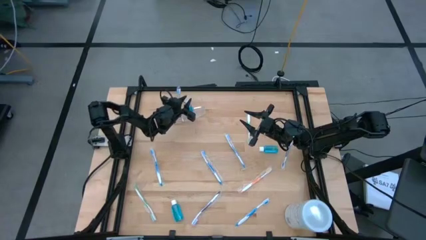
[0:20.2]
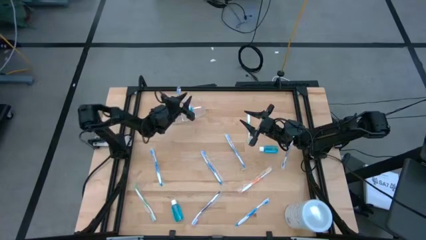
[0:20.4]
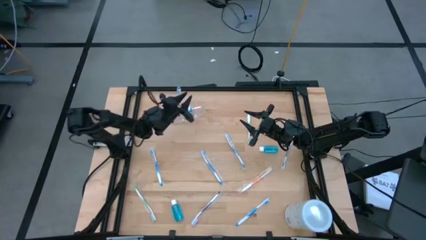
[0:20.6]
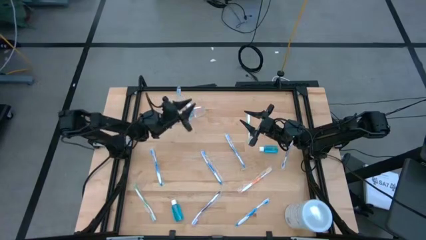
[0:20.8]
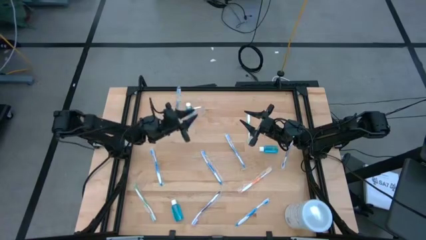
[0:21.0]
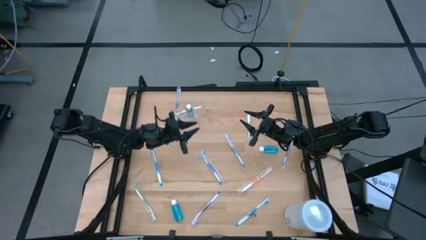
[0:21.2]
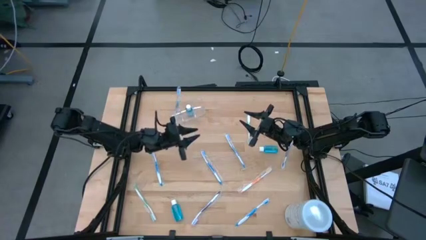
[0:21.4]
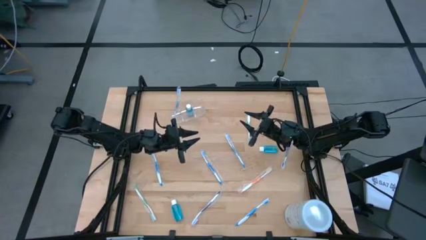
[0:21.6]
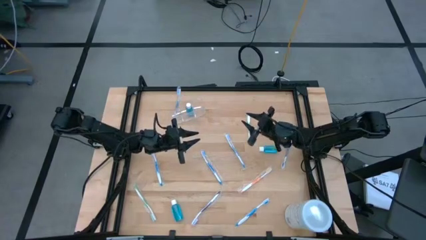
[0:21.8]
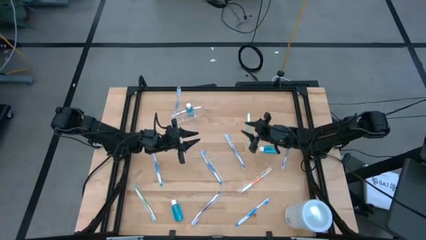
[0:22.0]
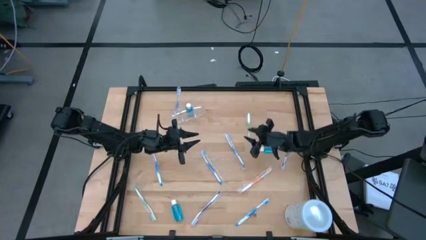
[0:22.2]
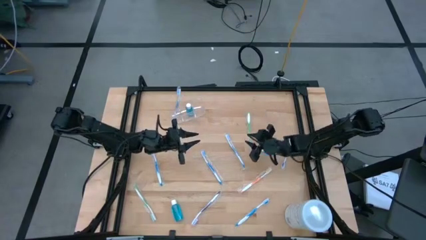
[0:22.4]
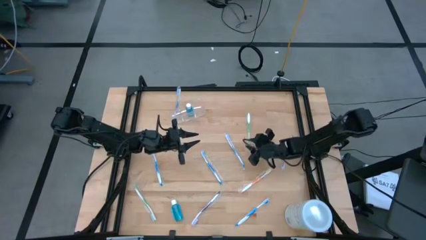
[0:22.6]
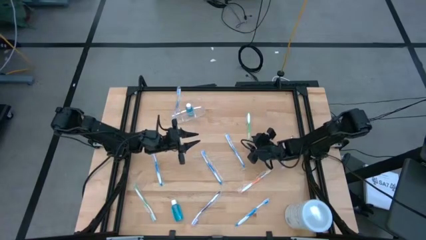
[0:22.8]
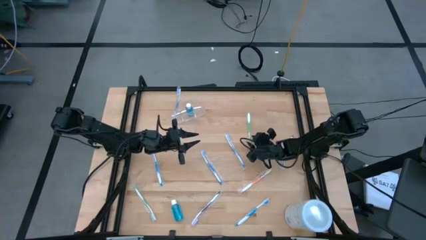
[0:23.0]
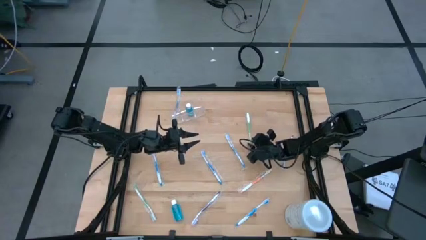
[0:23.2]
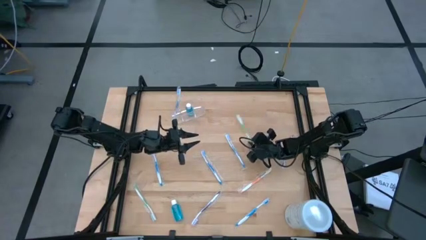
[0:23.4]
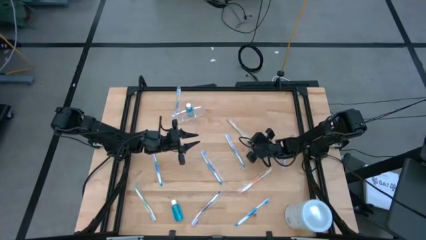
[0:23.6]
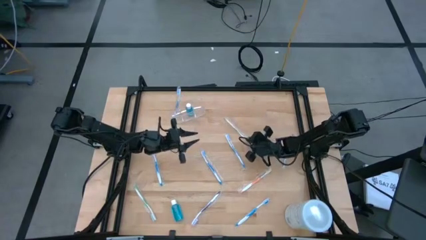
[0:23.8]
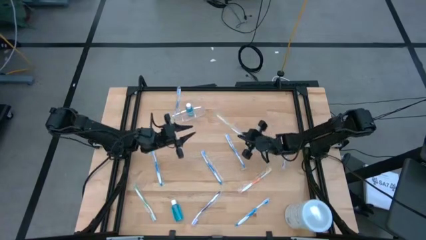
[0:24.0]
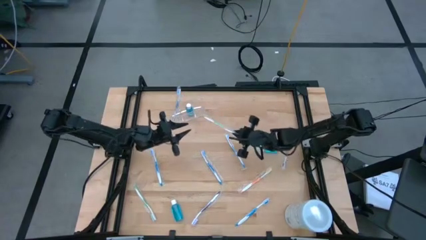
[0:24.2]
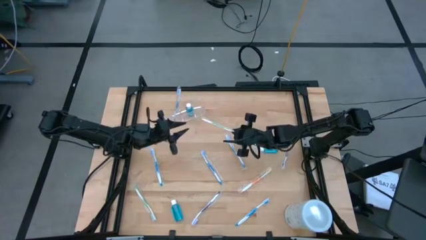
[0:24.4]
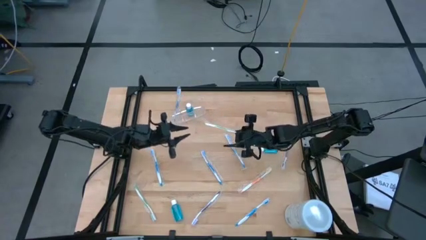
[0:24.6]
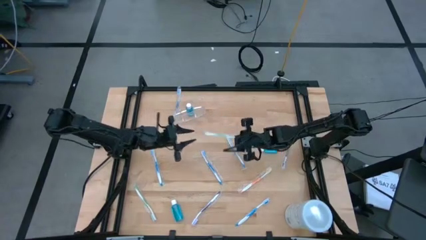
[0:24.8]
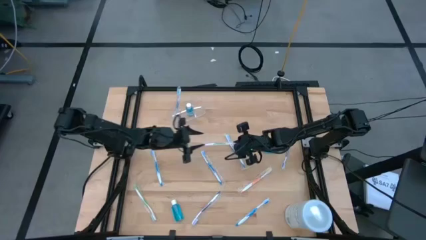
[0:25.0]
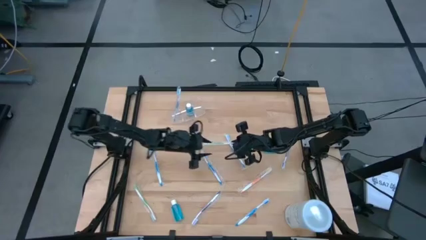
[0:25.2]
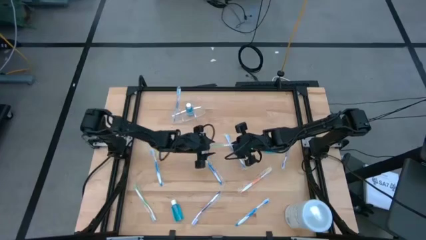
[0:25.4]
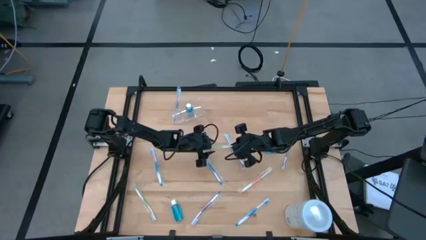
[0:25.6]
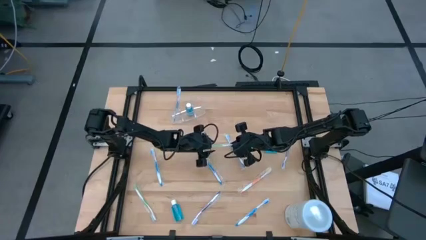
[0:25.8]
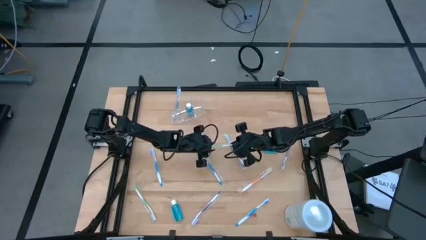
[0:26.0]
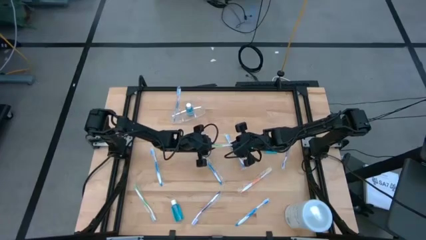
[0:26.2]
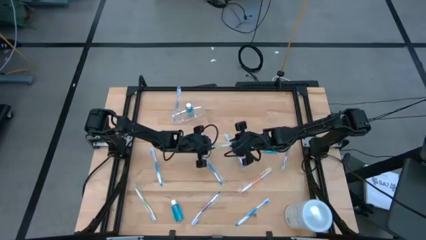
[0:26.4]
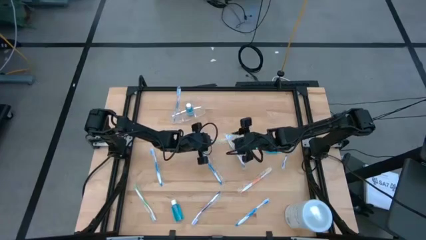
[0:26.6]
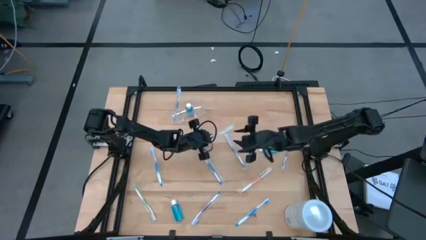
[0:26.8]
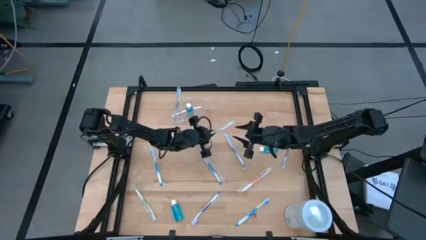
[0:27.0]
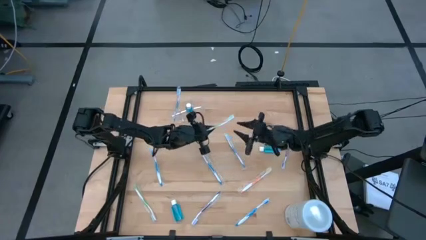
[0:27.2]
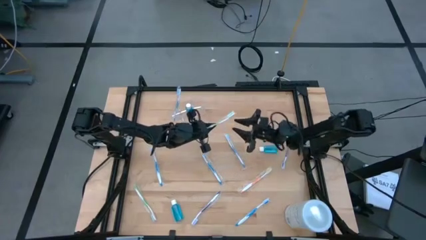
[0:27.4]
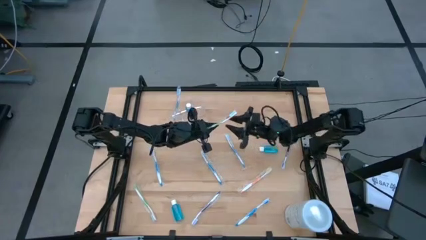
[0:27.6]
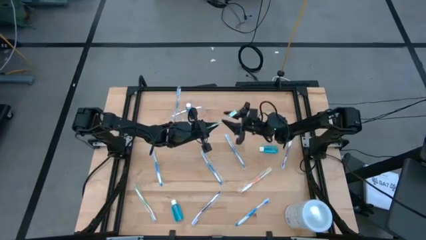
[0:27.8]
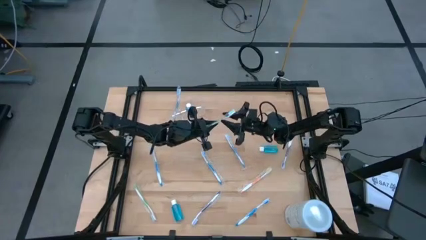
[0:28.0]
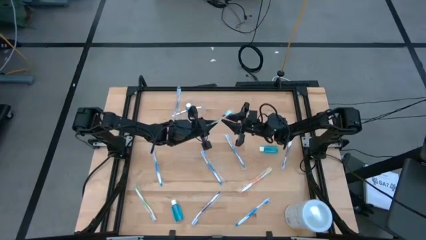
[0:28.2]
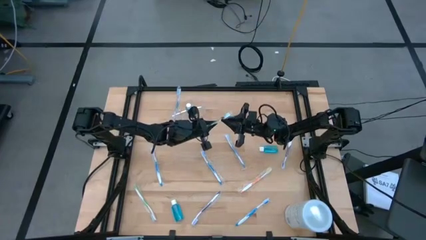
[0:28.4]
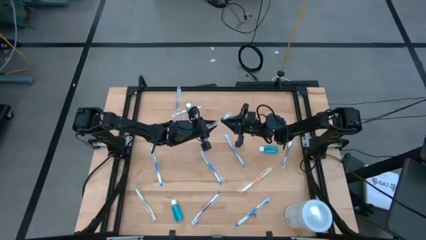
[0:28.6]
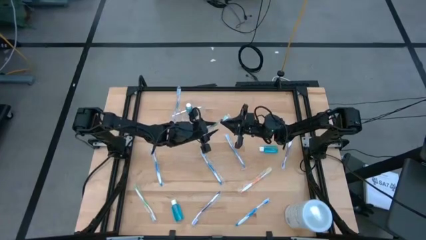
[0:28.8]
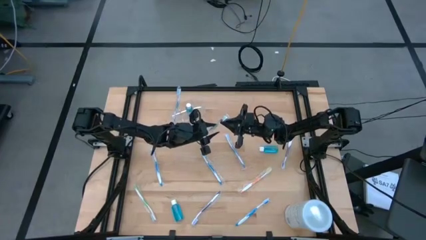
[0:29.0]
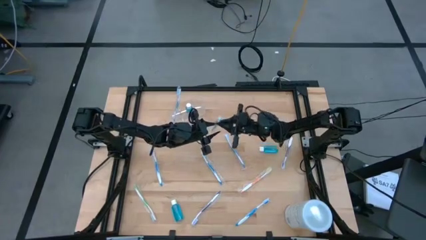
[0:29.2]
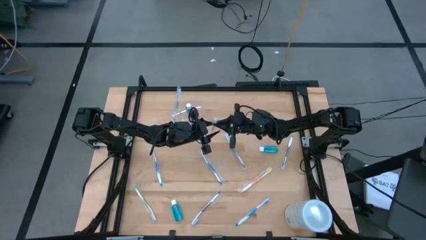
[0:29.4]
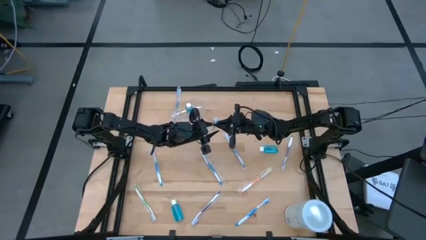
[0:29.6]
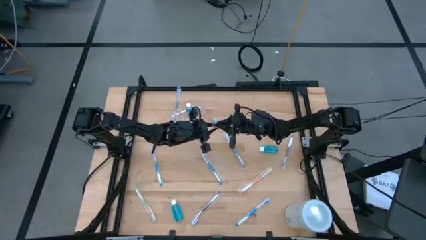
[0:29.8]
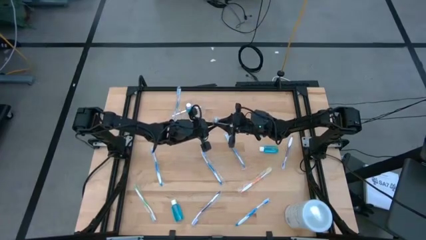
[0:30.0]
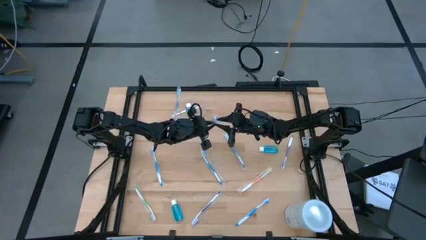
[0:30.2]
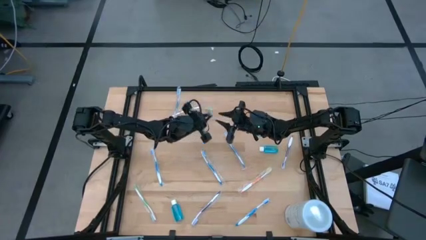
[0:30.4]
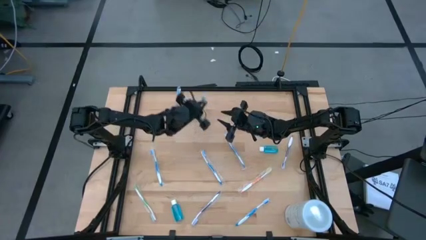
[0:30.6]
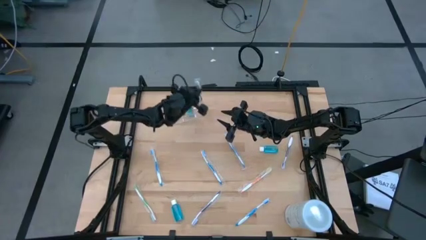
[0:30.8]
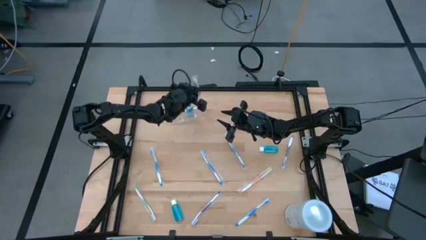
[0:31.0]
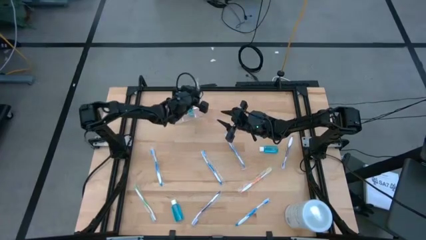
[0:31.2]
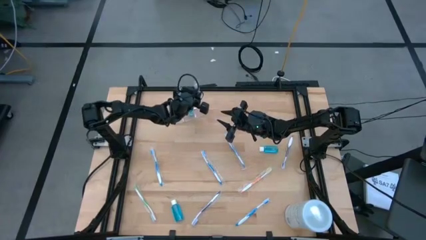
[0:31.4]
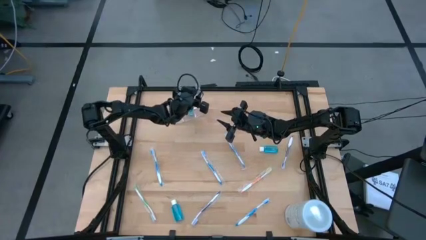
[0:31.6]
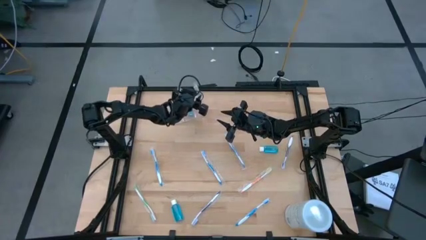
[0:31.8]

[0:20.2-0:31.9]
Task: Pick & Place toothbrushing station
Put the green toothbrush into the transparent organizer

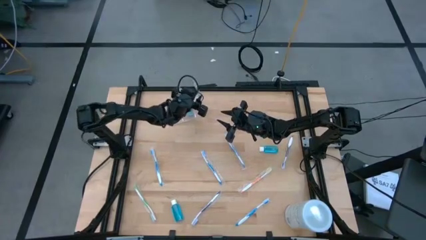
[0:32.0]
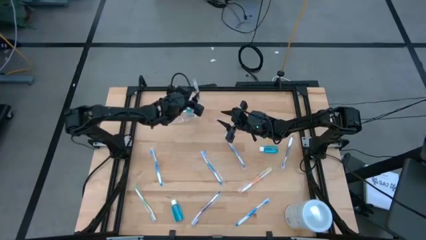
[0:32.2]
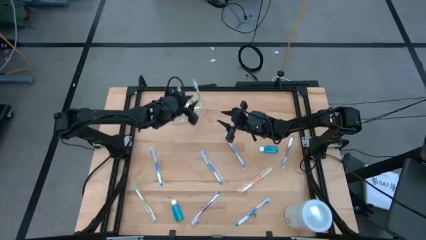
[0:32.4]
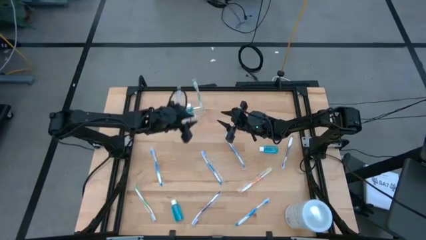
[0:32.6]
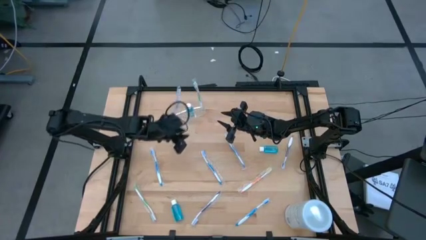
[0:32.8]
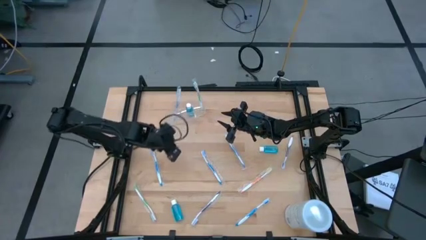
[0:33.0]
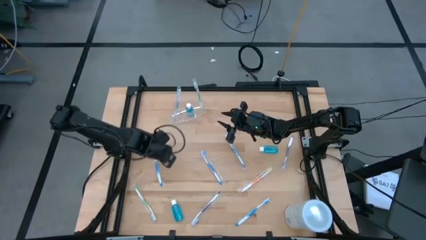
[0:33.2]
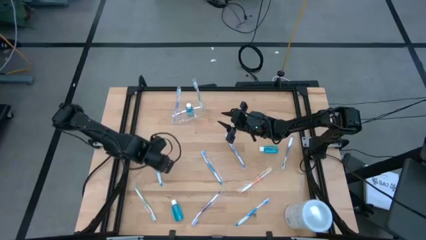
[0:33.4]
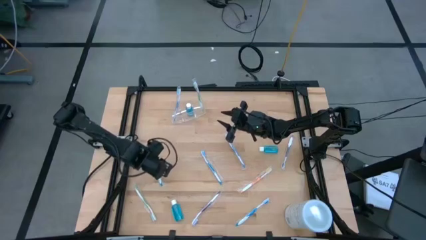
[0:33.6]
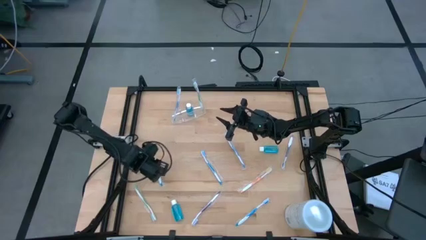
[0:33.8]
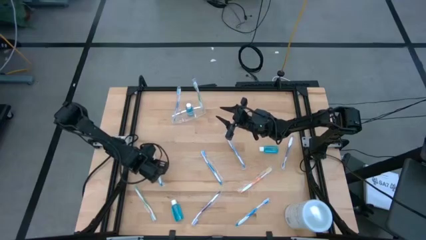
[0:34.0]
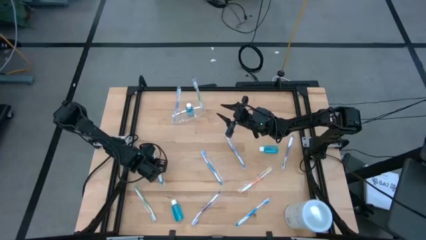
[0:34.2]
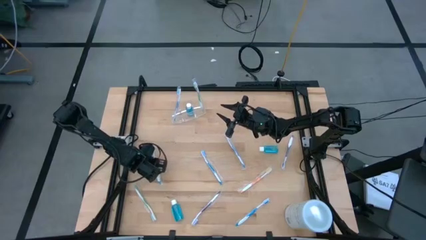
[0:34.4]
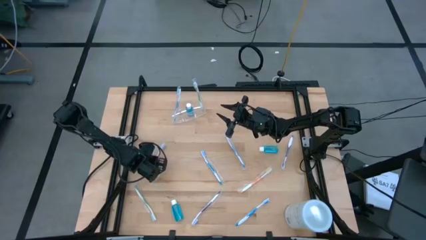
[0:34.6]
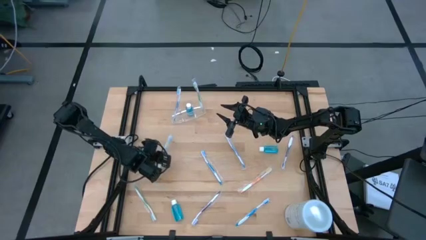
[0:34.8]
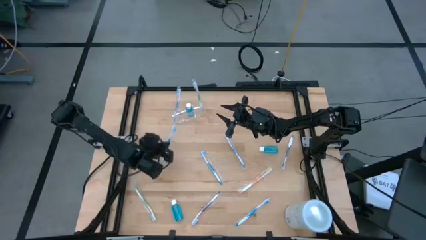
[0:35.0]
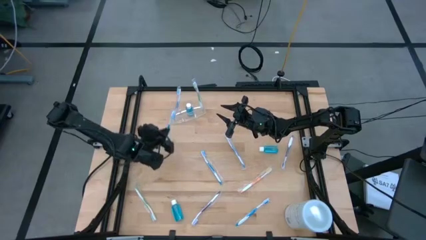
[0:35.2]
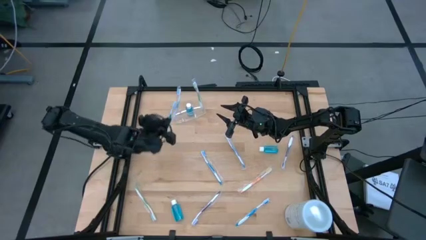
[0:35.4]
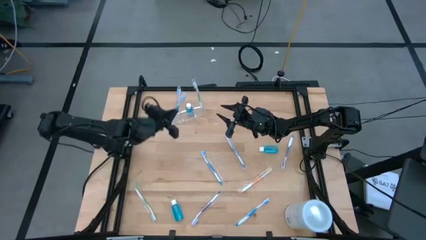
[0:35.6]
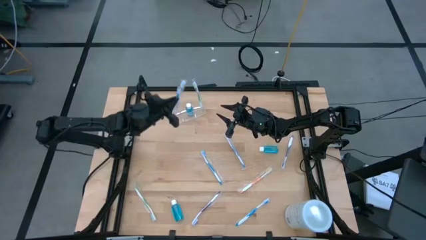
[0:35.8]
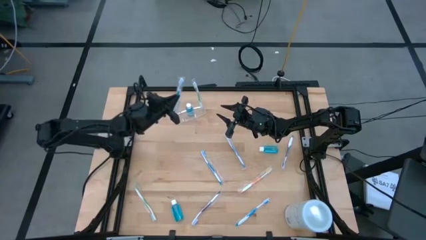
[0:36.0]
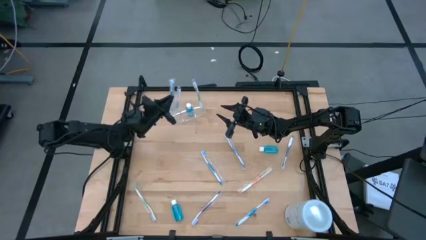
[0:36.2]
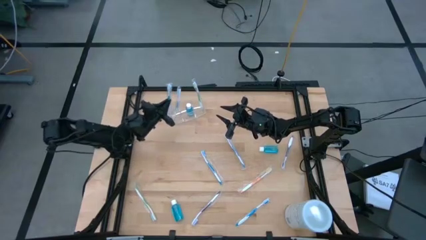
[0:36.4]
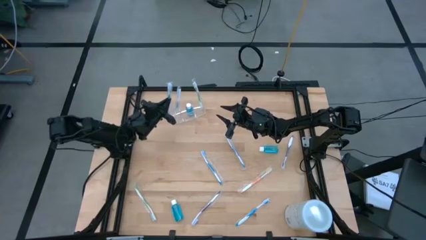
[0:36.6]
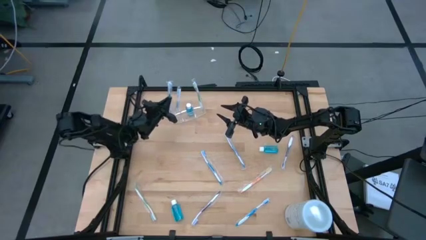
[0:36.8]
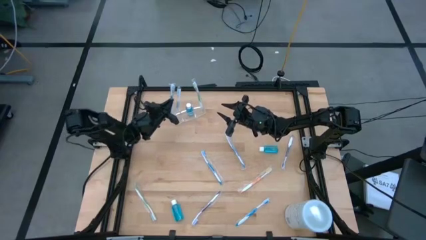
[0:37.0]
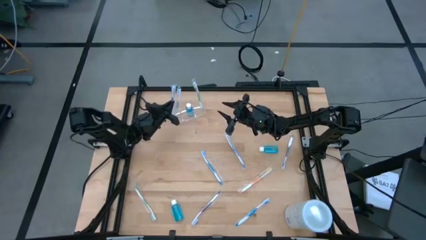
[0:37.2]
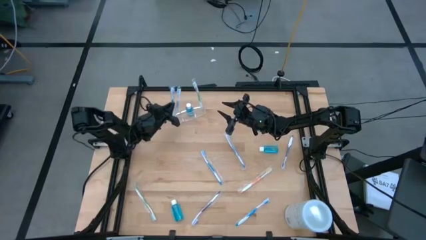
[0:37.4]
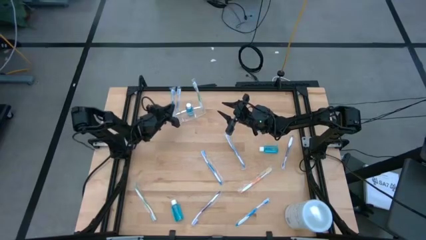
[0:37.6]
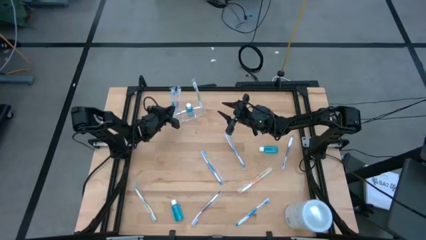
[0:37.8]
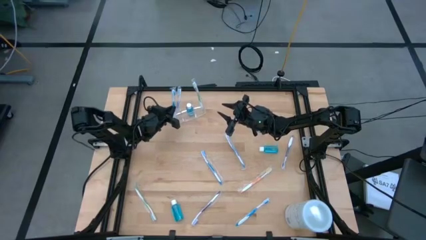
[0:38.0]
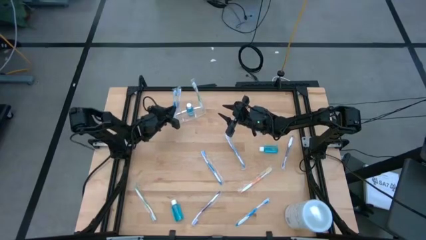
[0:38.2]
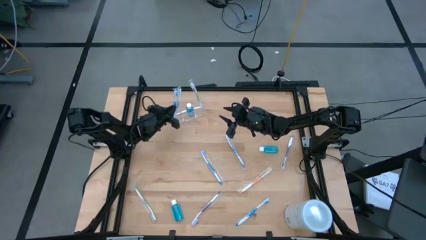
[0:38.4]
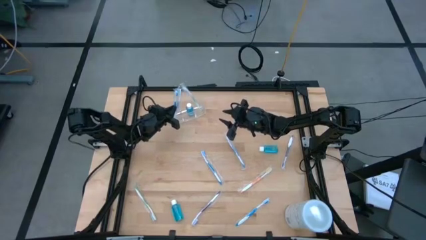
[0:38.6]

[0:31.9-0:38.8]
Put the blue toothbrush into the transparent organizer
